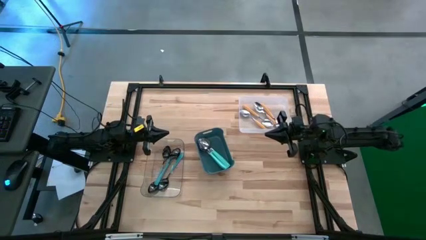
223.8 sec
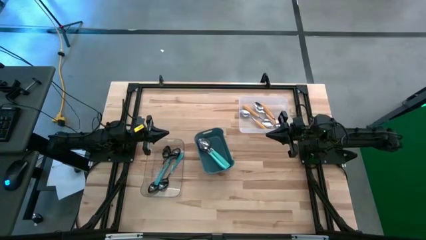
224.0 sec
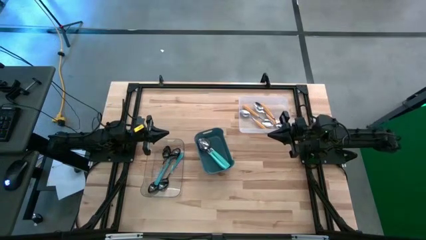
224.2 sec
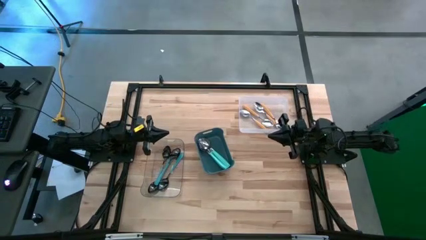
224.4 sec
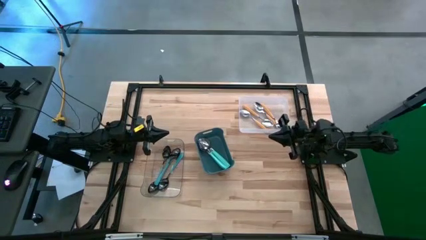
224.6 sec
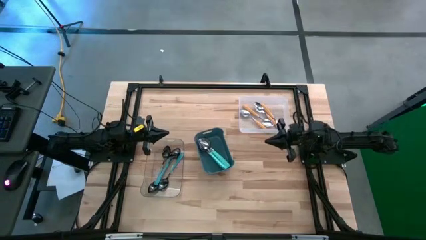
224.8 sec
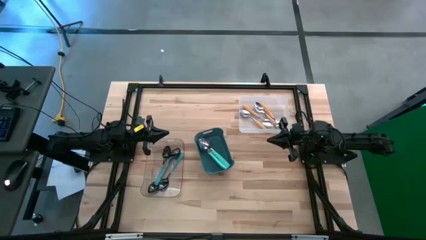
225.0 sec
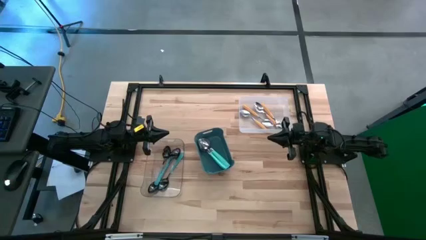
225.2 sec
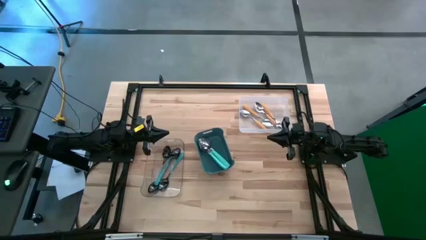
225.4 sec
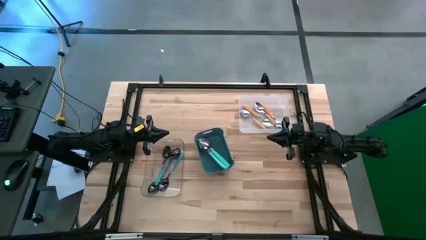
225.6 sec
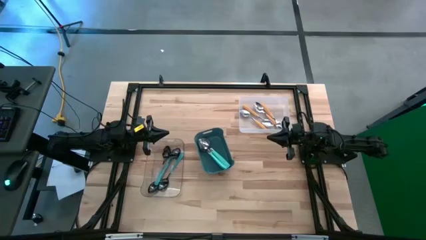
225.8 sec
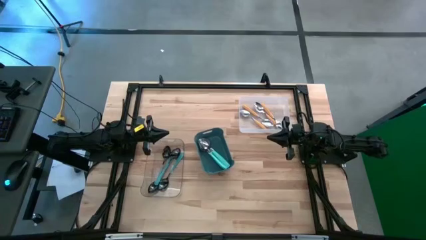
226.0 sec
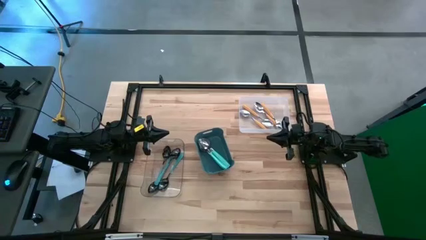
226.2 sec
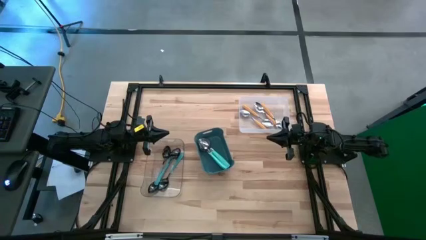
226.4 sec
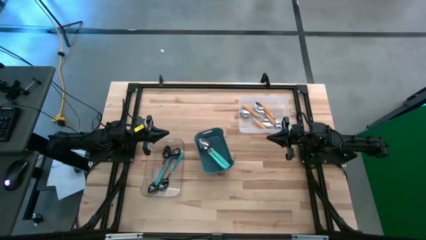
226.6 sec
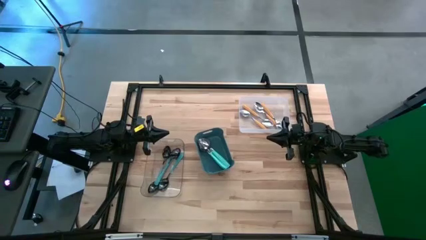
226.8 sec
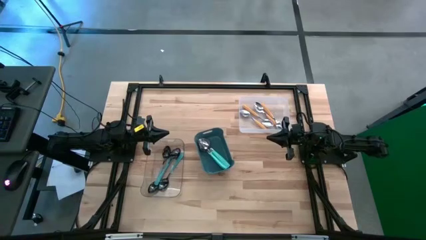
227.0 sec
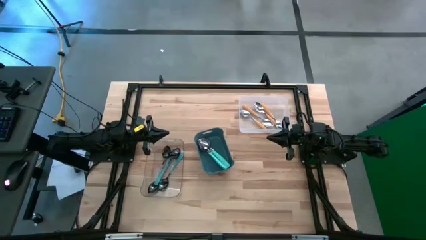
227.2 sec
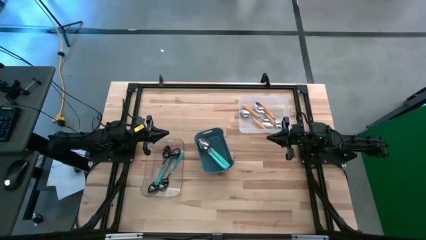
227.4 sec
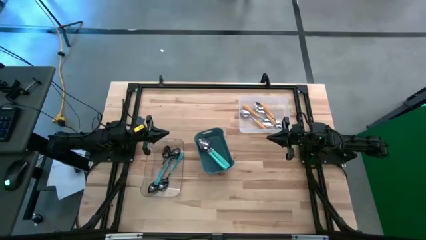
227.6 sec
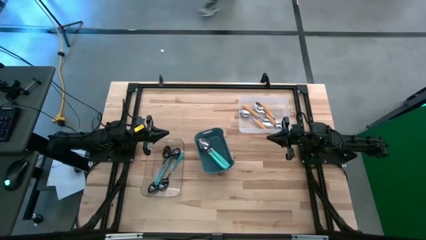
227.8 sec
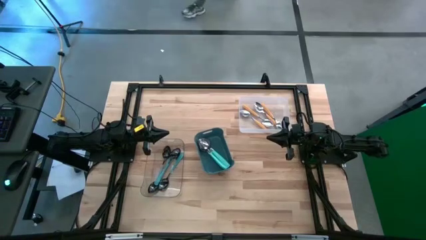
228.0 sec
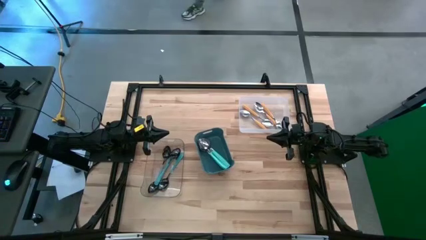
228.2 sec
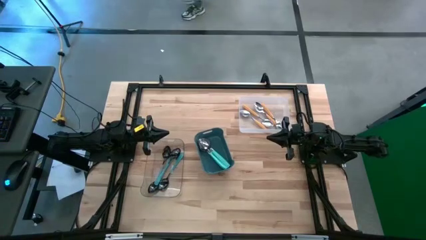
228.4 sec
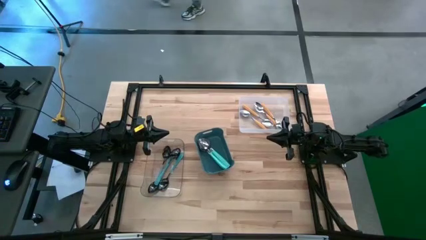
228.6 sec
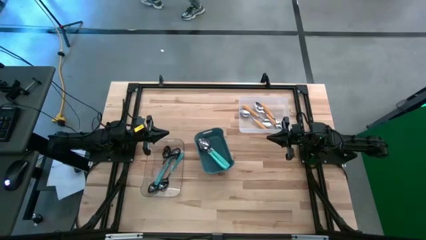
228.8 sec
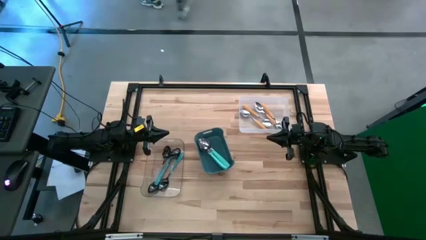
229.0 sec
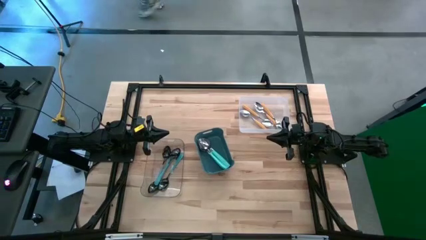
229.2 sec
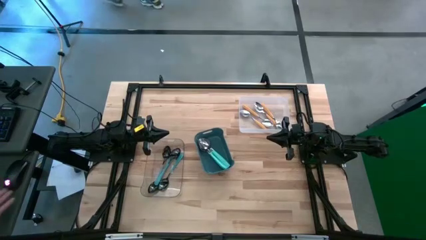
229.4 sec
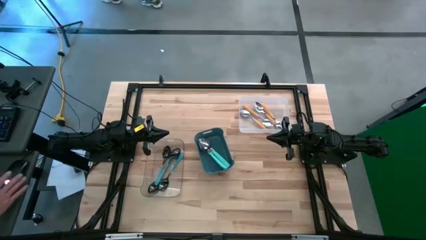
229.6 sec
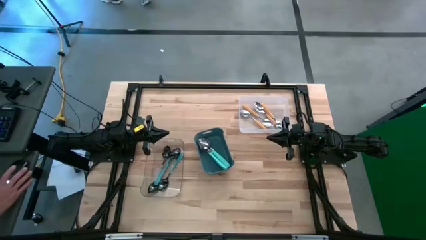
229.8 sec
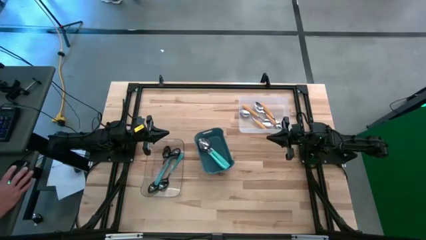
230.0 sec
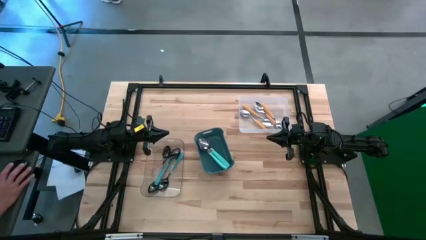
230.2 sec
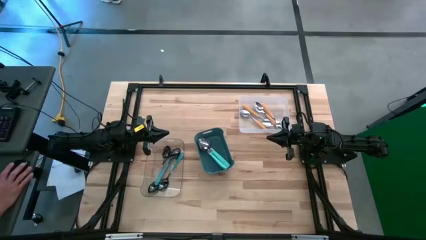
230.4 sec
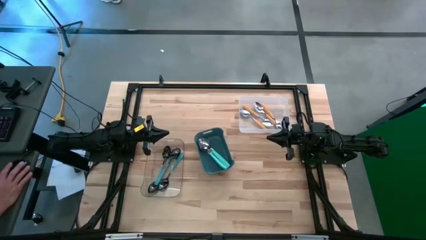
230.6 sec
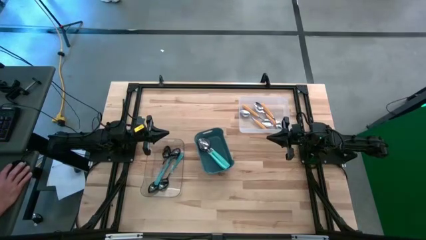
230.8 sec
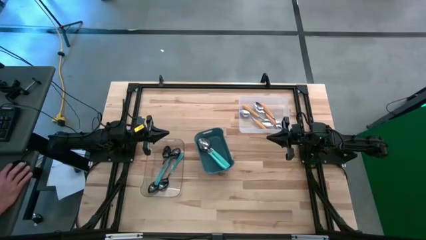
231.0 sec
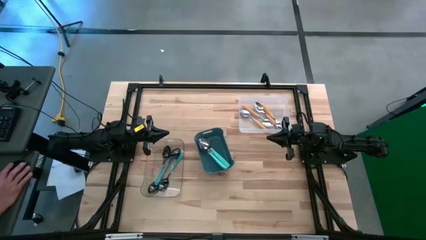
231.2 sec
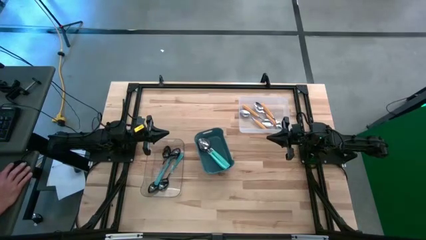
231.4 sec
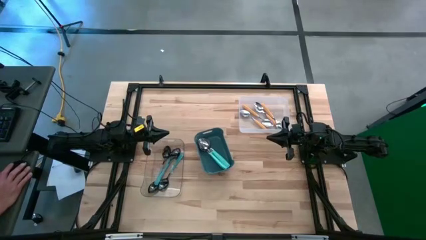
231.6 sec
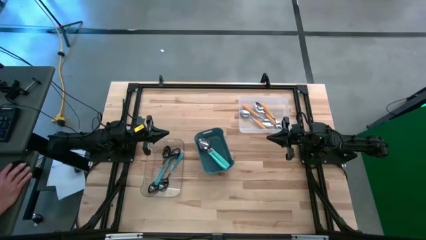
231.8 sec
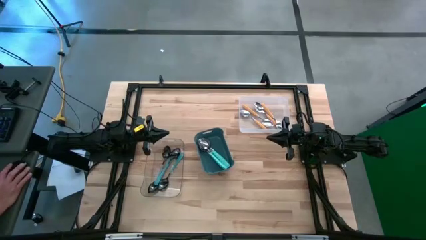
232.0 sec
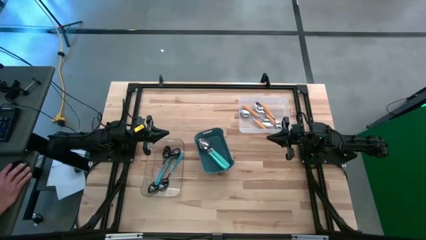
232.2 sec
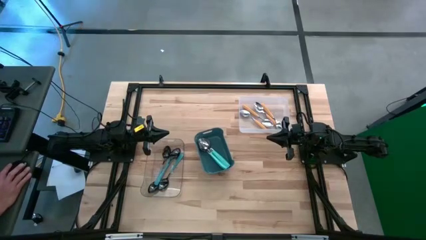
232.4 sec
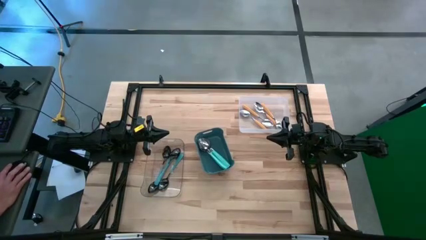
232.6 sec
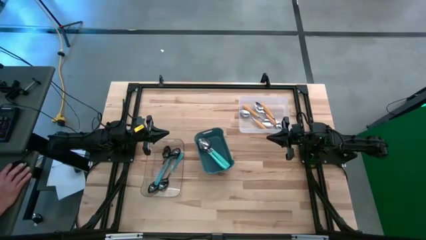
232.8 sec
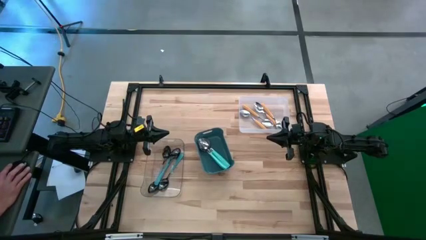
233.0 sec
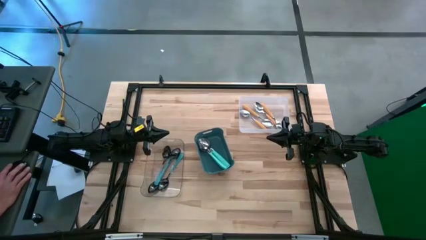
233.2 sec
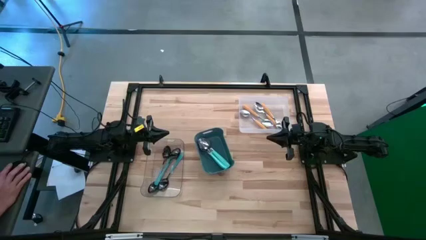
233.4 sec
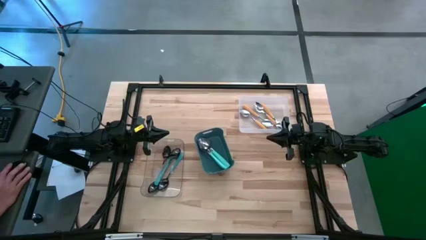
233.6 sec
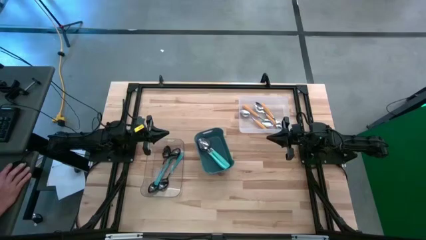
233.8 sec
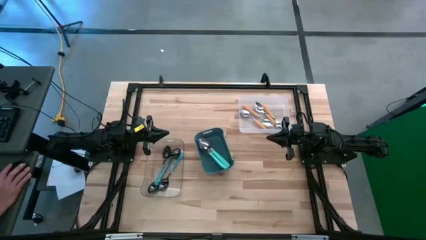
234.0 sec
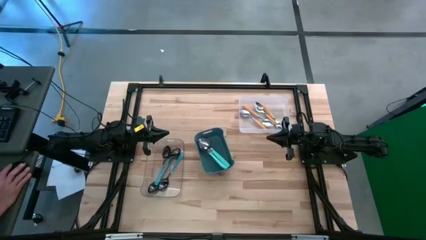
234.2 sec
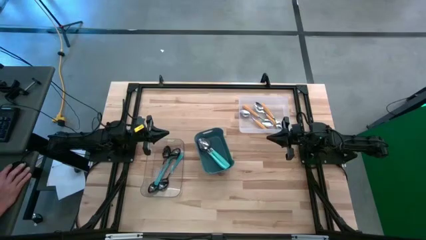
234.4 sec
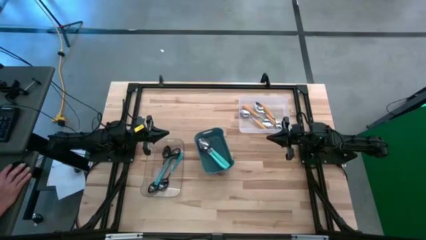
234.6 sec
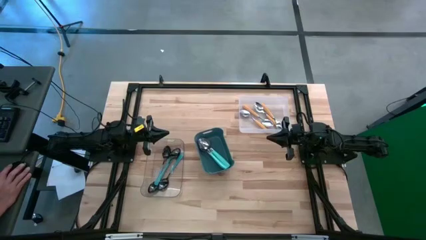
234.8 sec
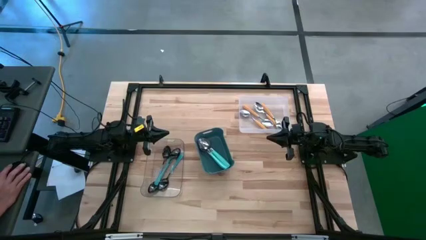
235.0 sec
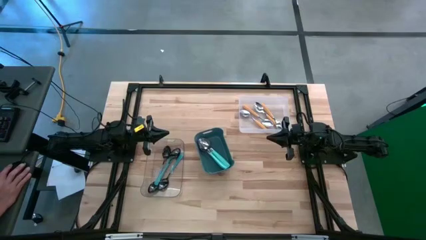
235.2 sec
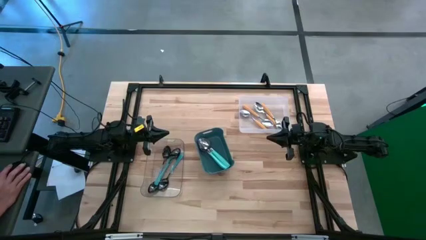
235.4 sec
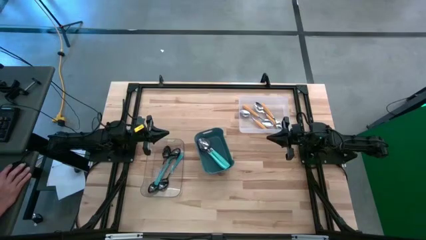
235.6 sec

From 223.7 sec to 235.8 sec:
Task: Sort silverware by color (type)
Return to Home Position

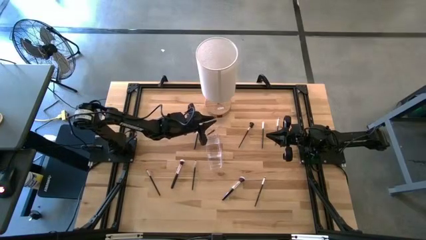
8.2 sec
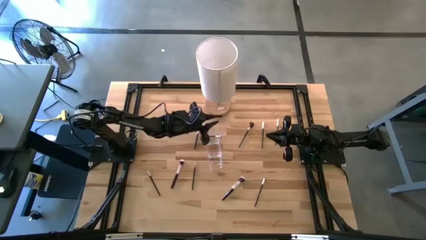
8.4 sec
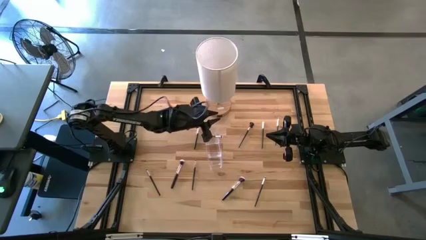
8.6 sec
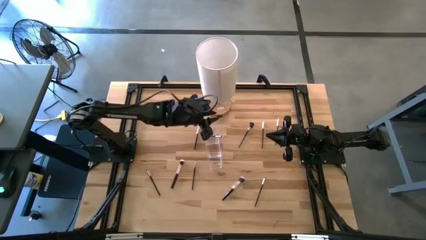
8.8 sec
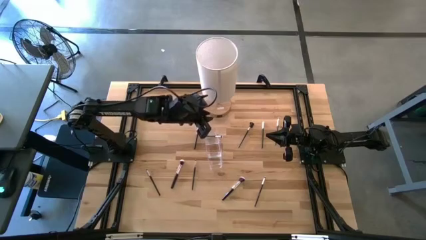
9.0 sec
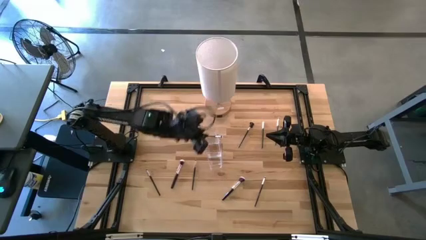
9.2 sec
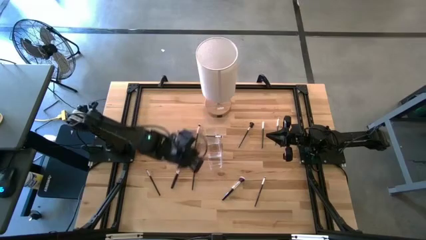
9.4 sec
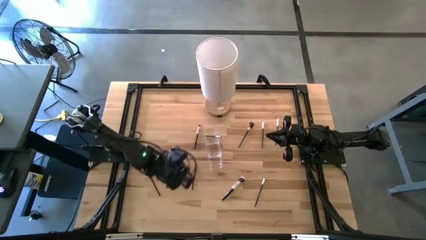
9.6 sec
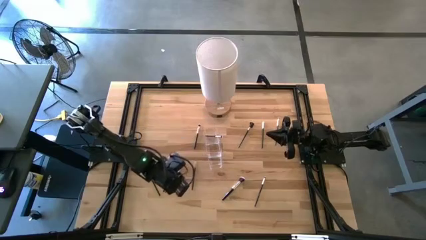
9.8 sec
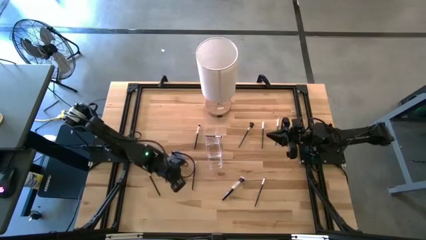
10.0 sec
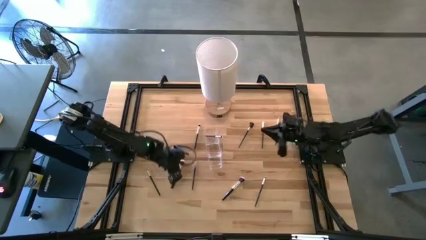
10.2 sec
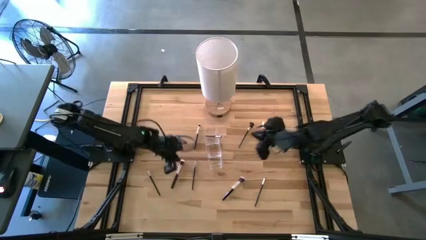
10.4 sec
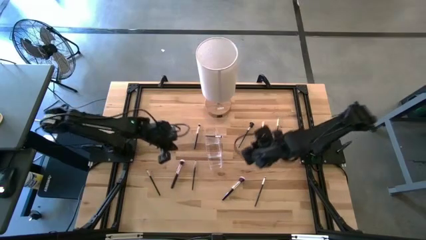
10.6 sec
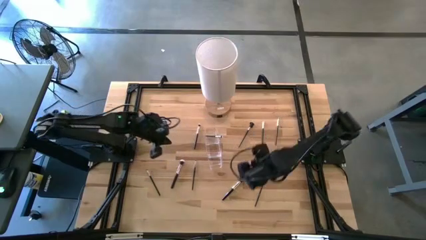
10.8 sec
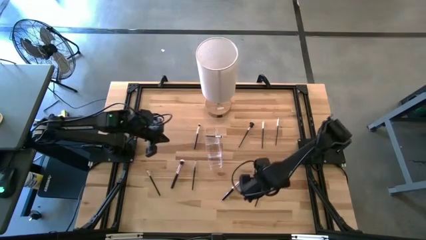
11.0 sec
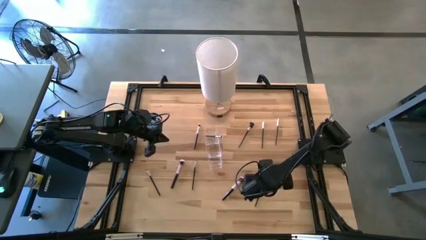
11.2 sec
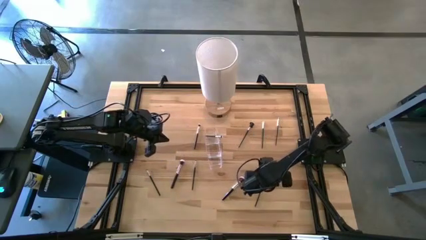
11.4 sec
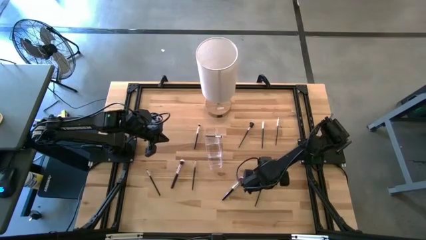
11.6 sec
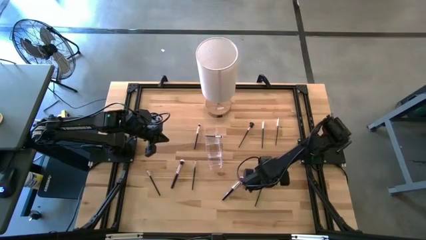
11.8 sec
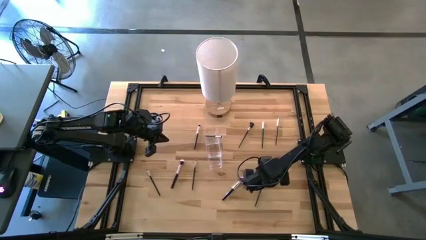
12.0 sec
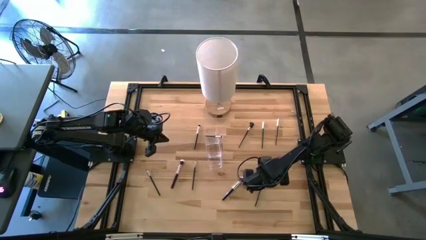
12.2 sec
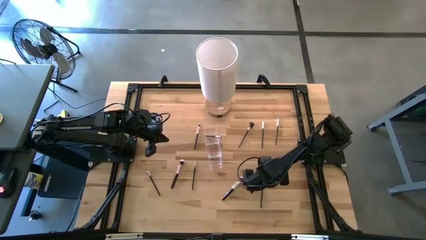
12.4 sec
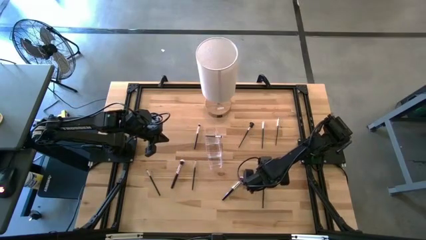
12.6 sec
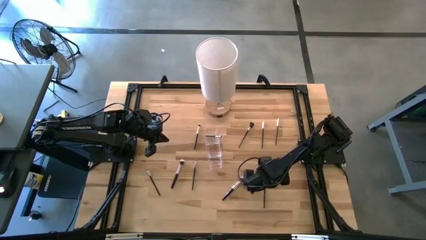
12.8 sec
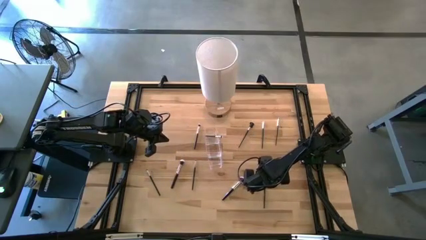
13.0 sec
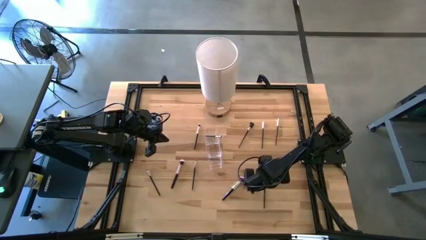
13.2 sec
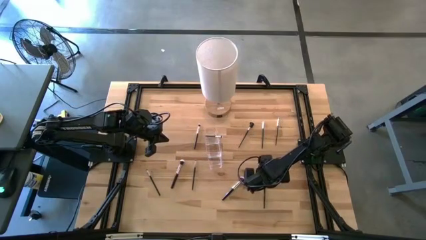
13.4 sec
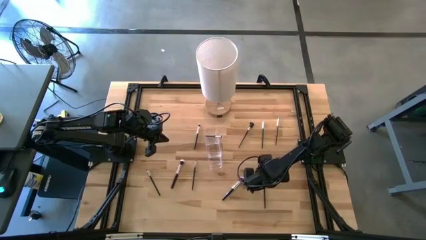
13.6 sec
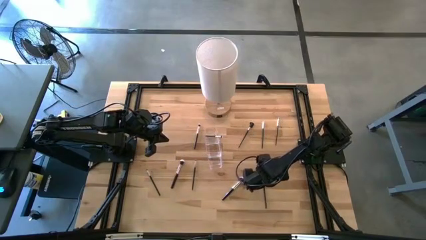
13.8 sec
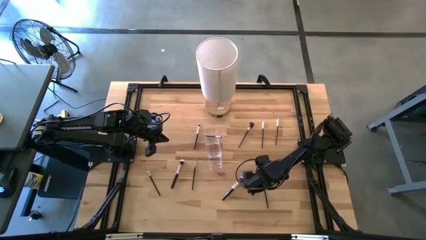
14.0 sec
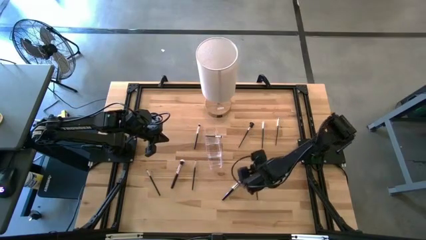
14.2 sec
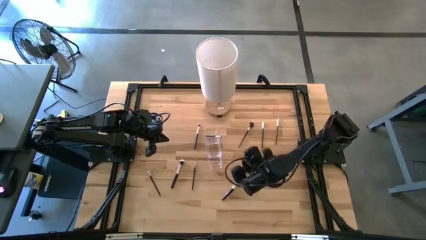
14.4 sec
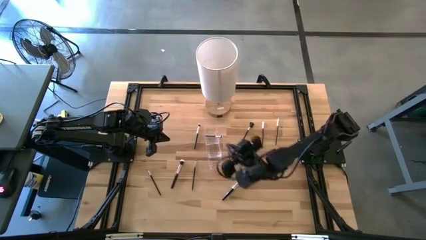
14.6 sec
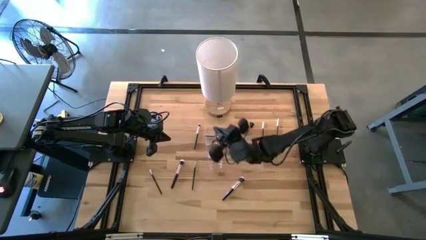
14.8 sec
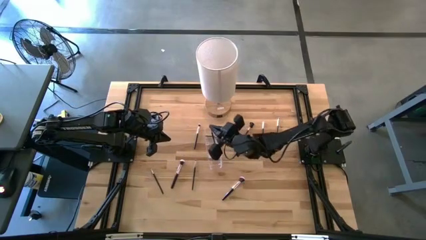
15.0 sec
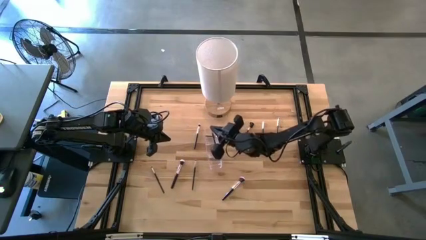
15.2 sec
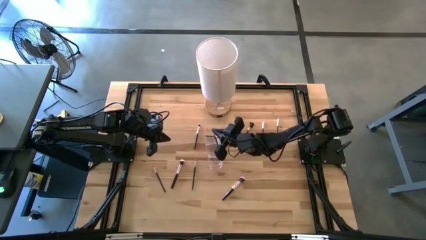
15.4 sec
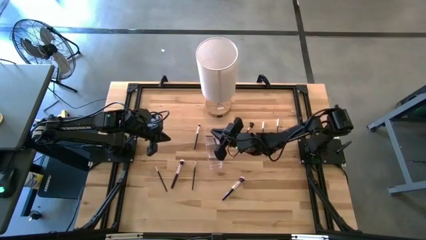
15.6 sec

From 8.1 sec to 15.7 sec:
Task: Put items in baskets/containers
Put the black eyeshadow brush into the transparent organizer
